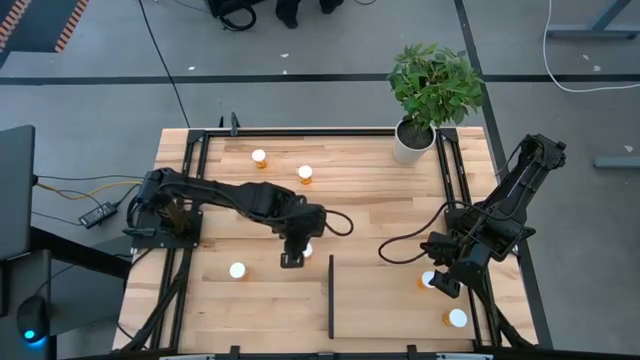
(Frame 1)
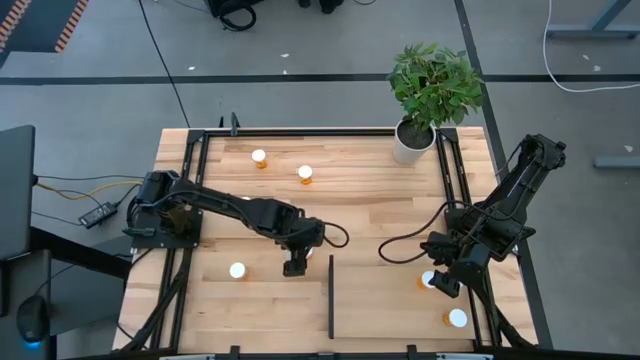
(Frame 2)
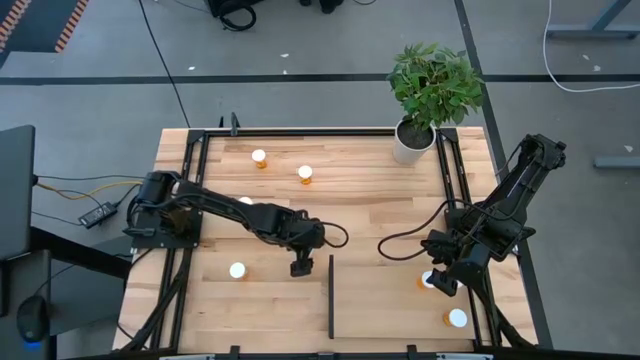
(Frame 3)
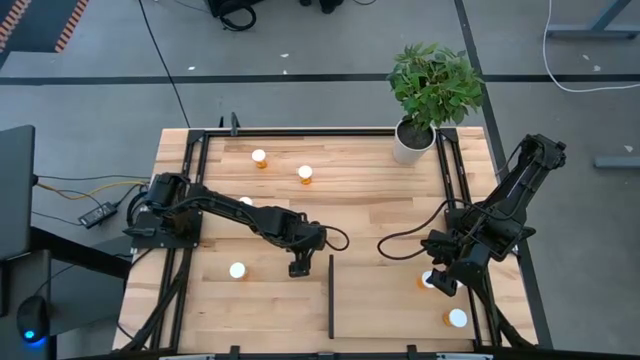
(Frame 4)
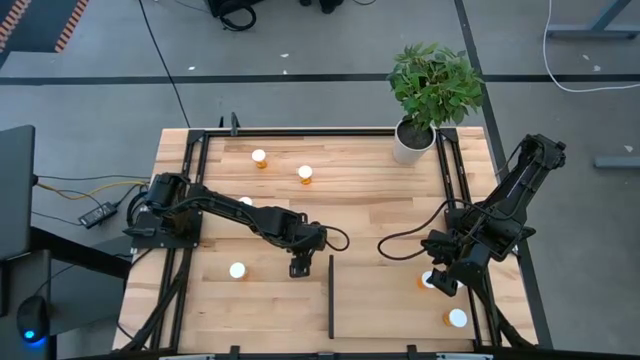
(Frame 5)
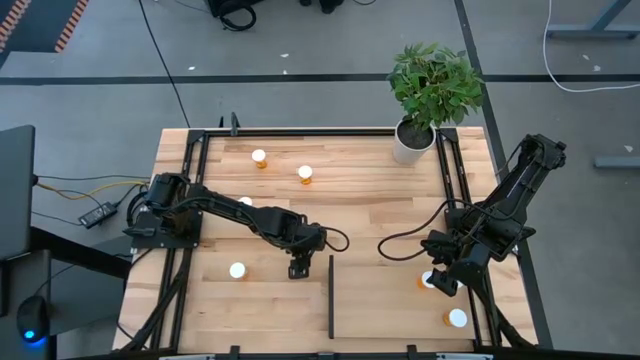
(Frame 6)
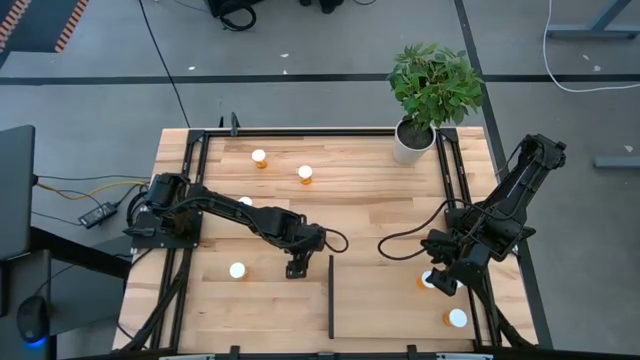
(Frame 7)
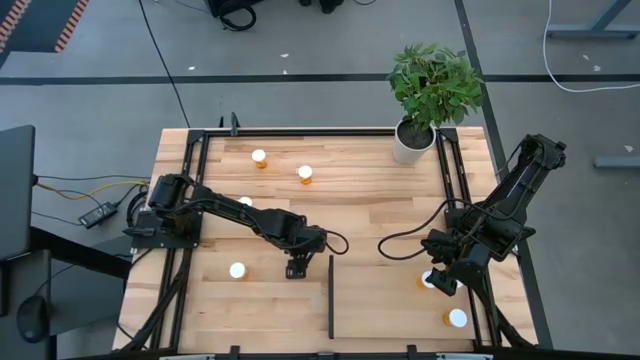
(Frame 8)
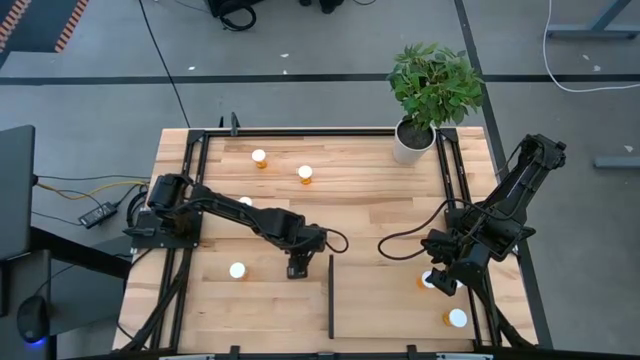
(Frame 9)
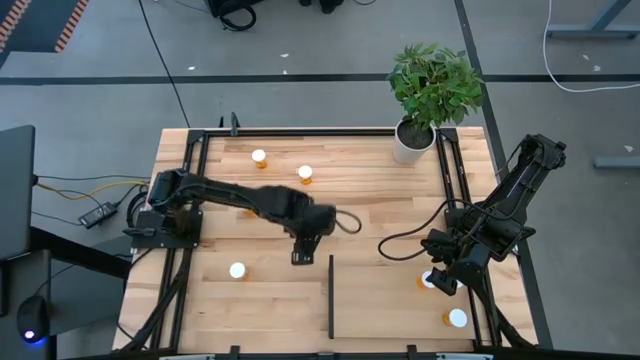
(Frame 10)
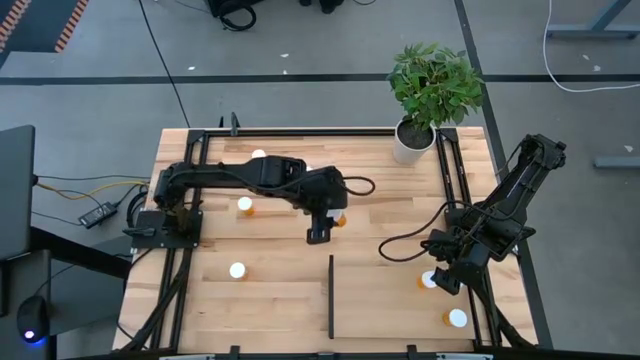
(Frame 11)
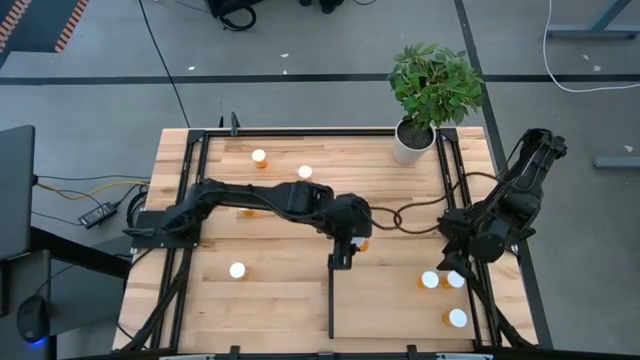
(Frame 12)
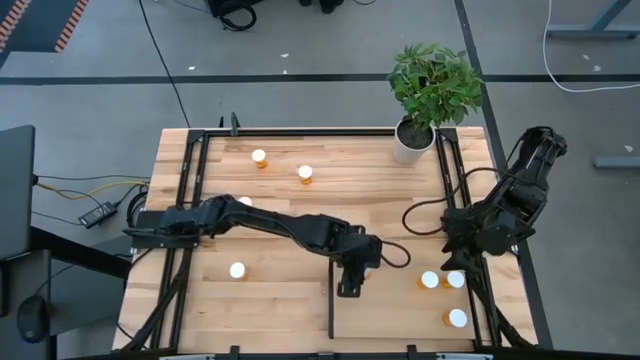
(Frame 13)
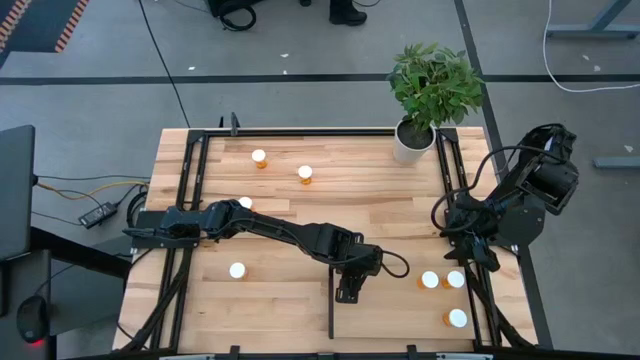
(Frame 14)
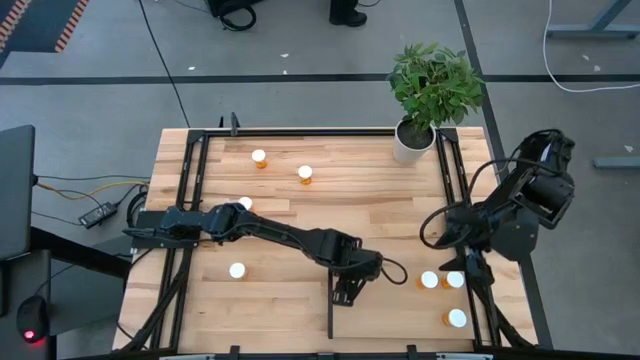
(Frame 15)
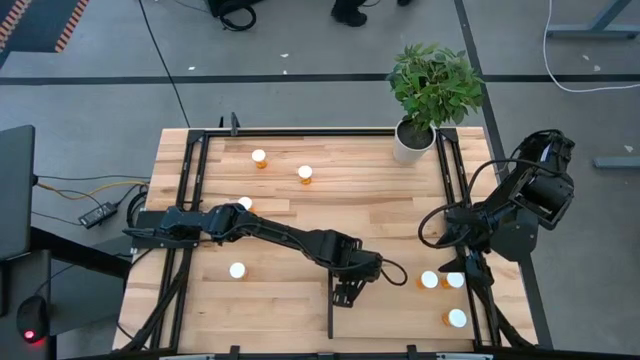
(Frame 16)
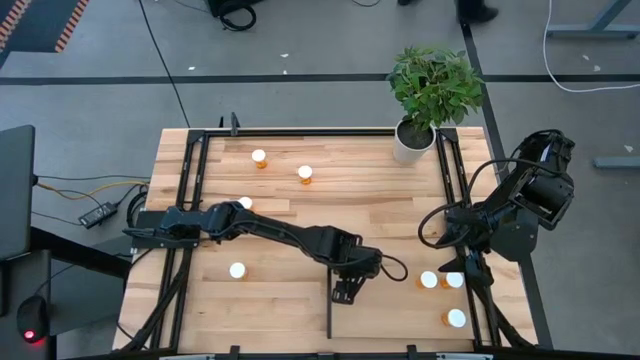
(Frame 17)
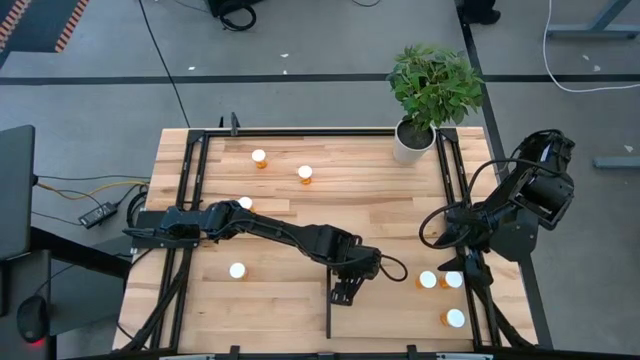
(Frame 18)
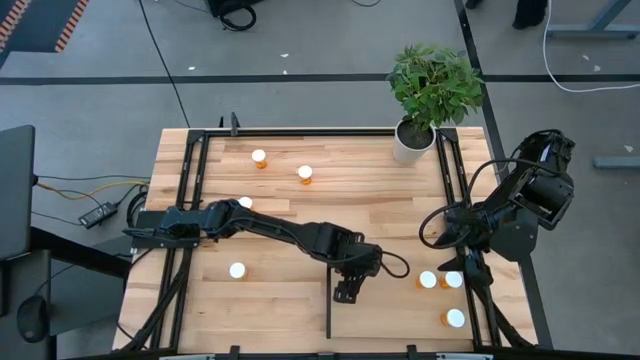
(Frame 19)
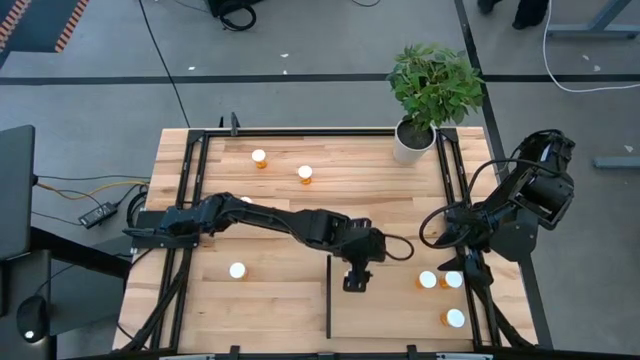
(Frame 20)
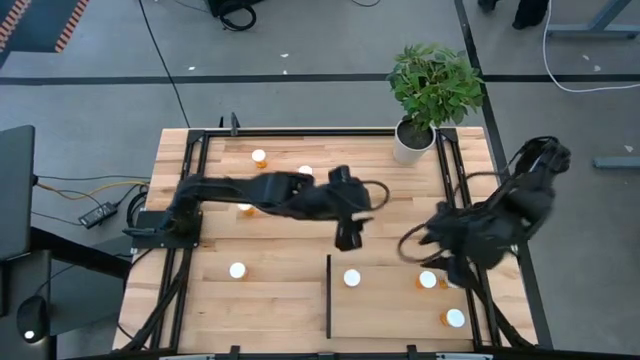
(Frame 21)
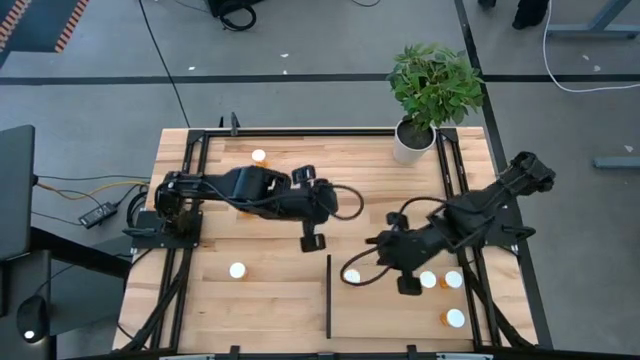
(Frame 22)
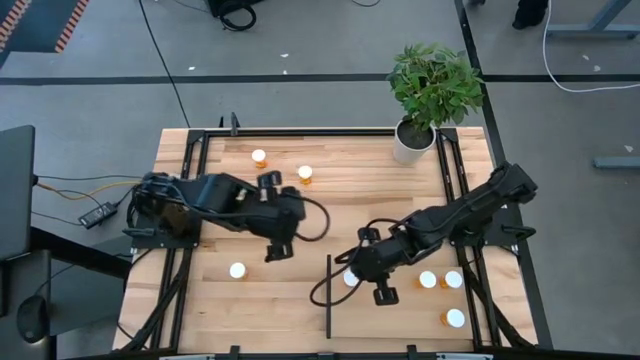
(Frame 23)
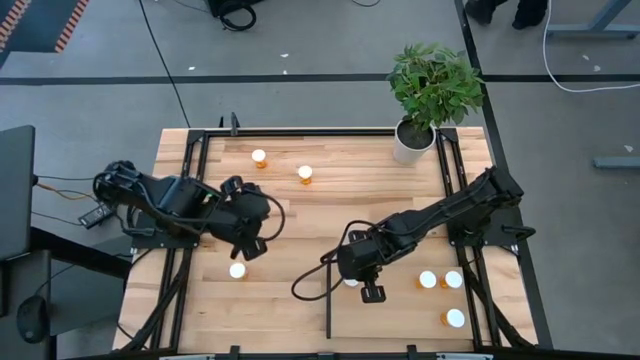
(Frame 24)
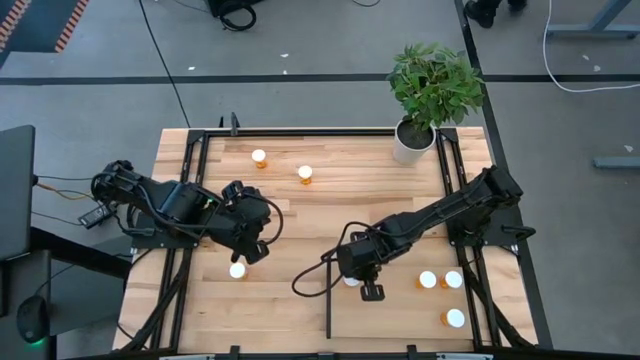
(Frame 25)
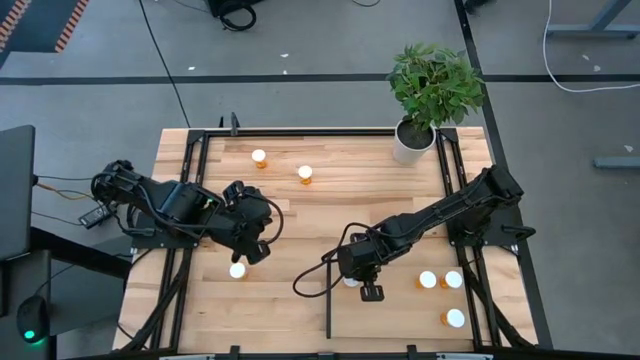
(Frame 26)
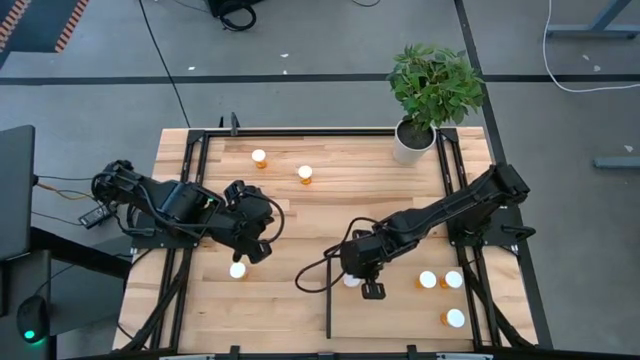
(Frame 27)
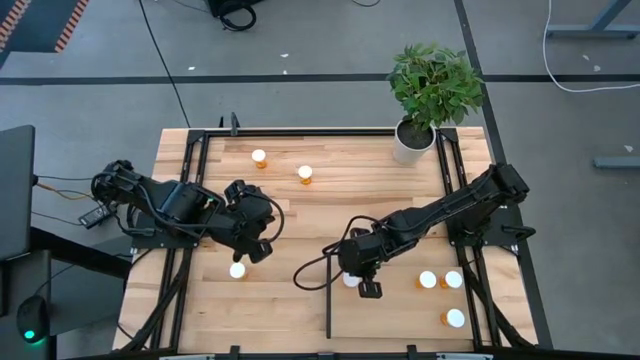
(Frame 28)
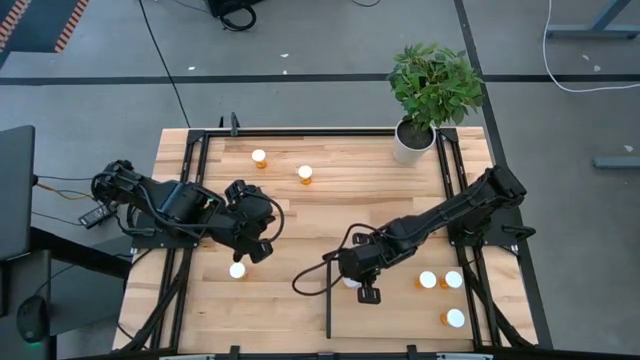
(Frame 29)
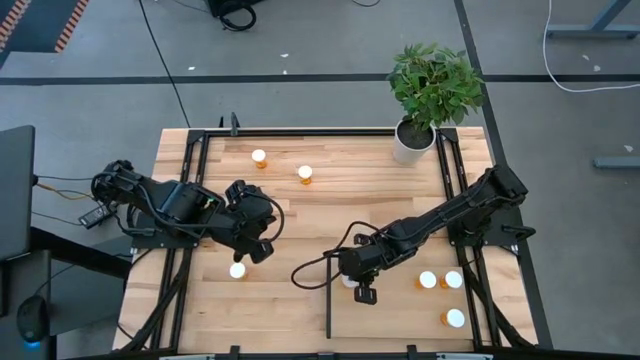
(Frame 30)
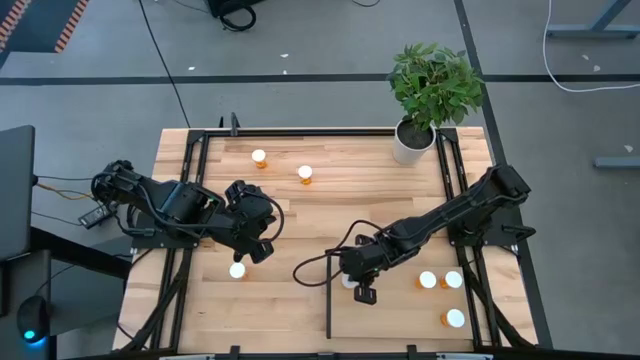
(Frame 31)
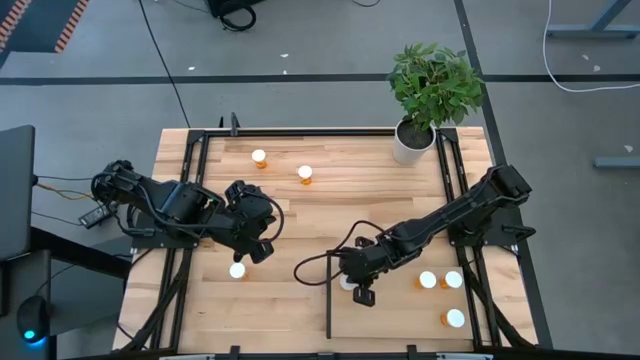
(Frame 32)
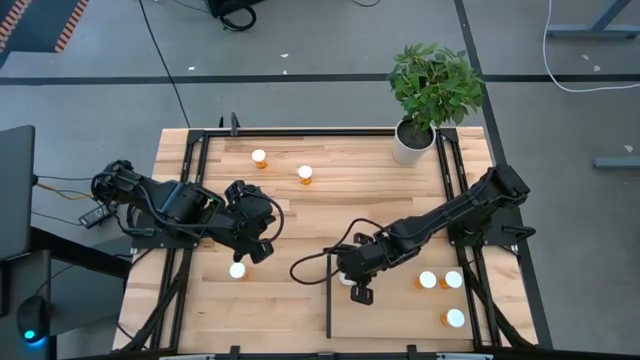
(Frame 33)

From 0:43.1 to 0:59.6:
Task: Pick and place medicine bottles onto shelf by color
Put the orange pill bottle on the shelf

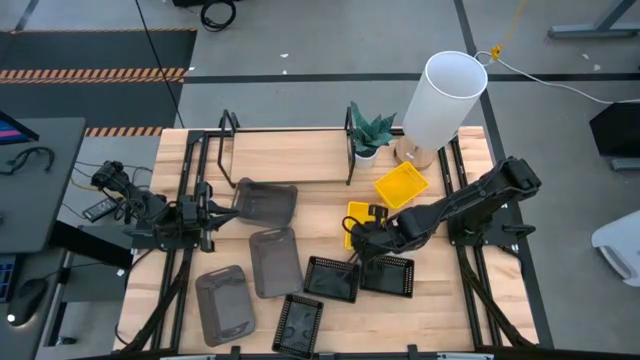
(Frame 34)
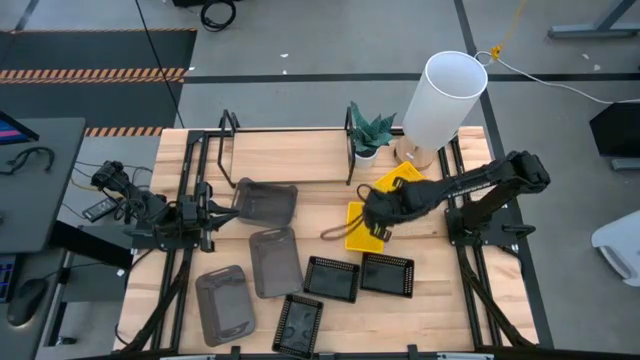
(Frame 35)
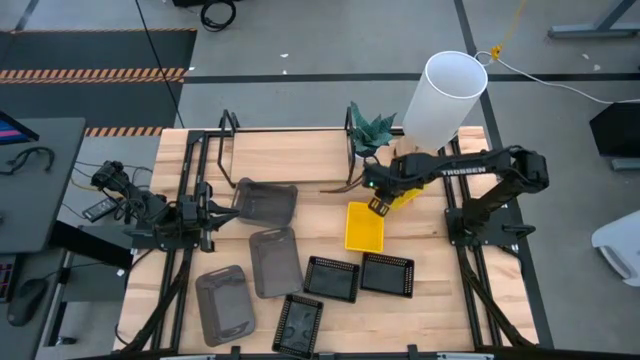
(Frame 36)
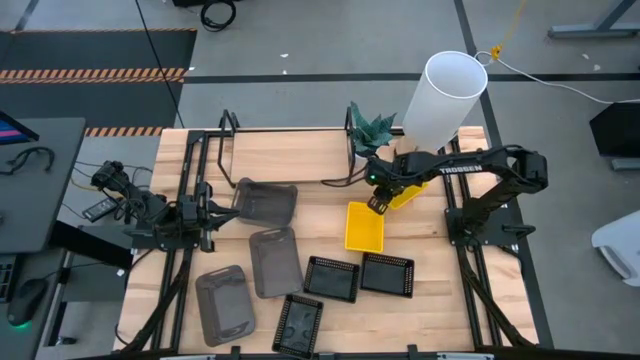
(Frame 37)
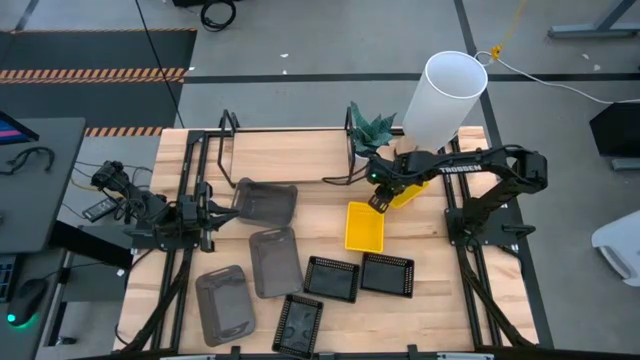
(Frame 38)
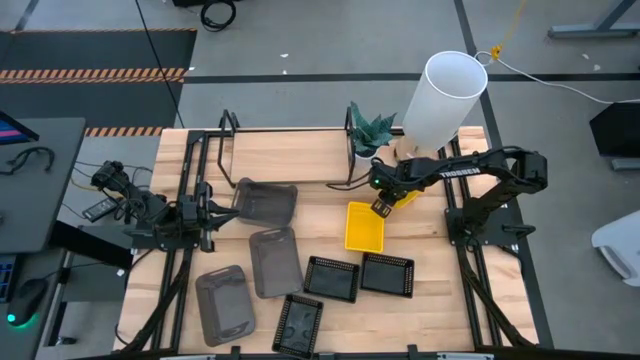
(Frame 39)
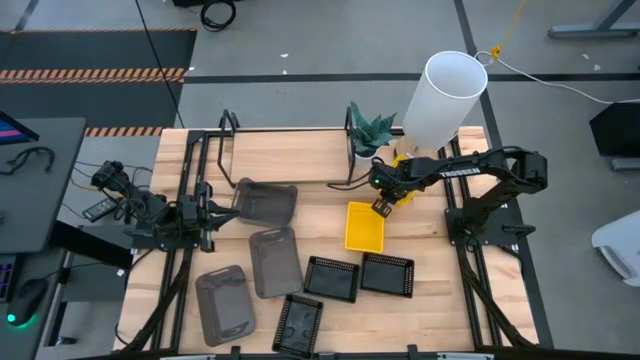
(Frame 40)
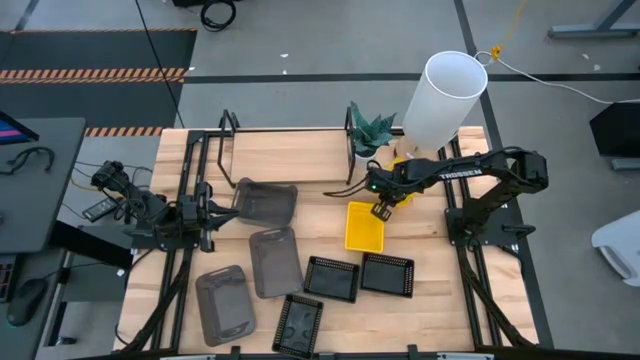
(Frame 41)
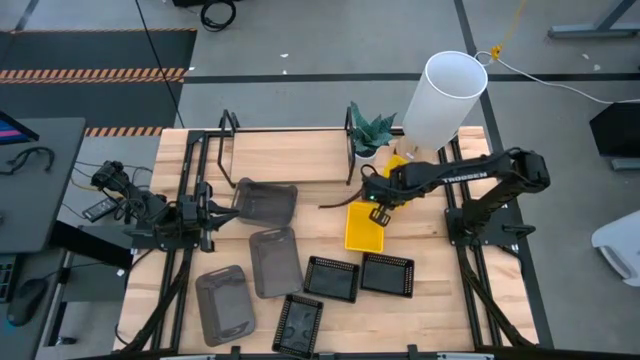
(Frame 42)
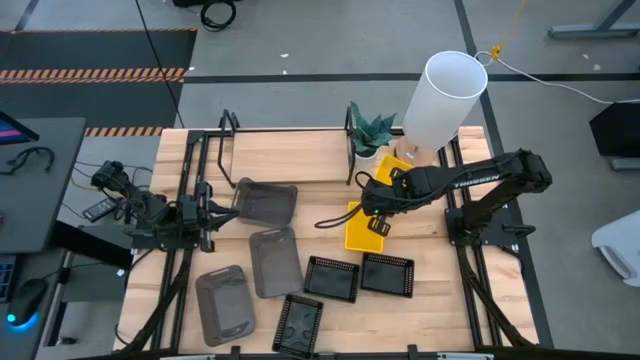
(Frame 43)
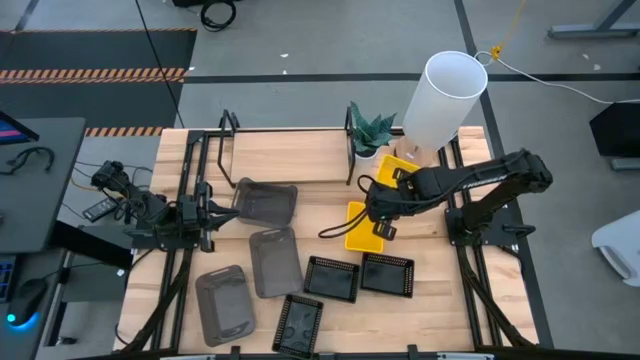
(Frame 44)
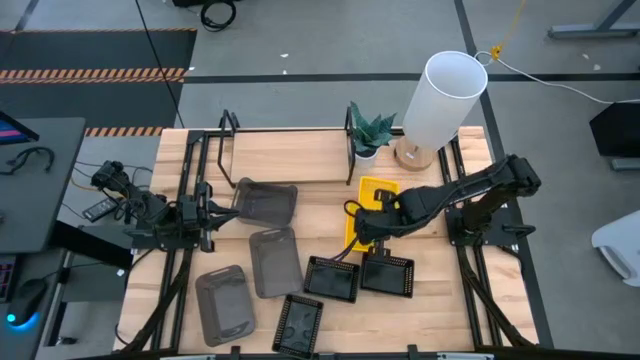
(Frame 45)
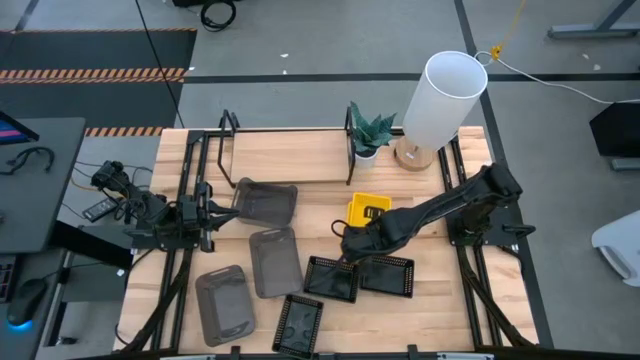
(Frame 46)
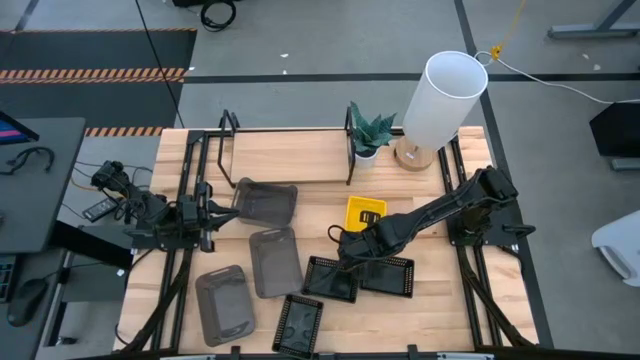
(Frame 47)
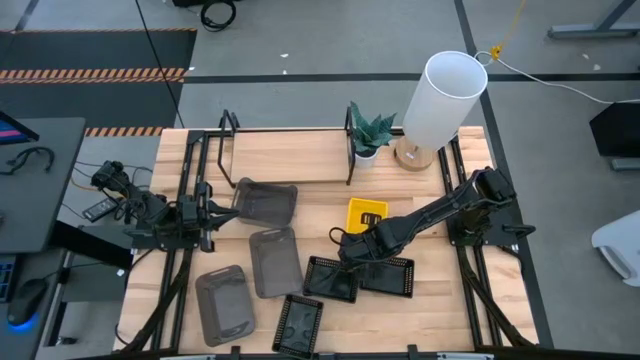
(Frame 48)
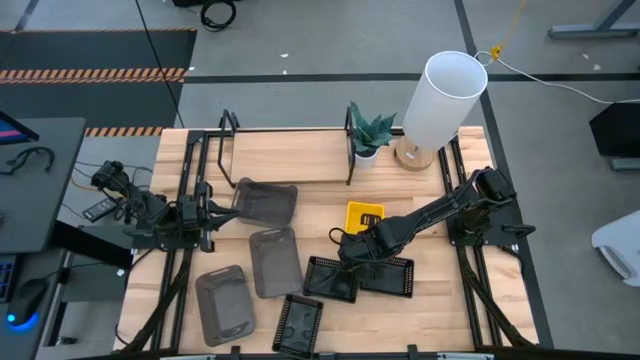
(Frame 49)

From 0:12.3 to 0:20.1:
Task: Stack baskets on shelf by color
Stack the top yellow basket on top of the bottom yellow basket
